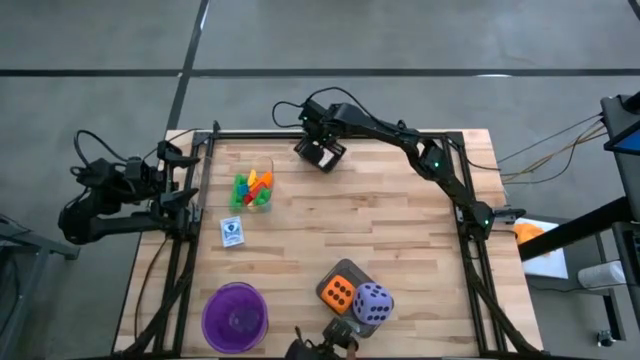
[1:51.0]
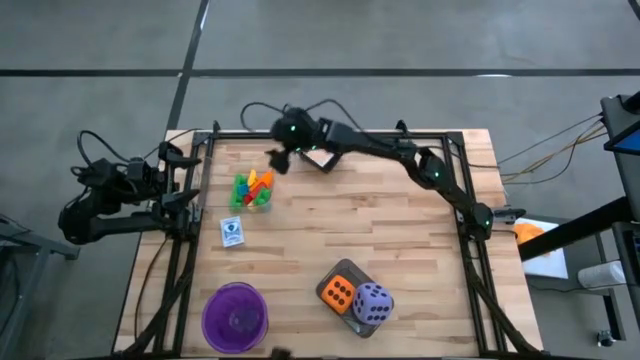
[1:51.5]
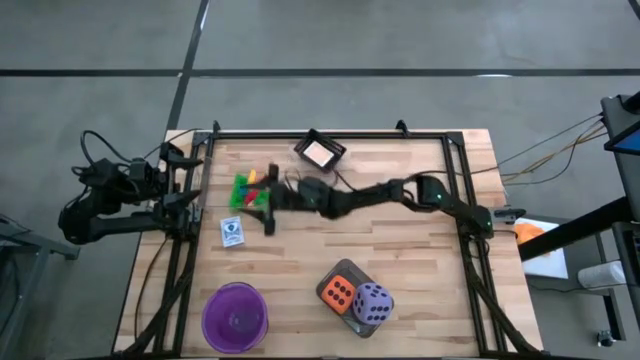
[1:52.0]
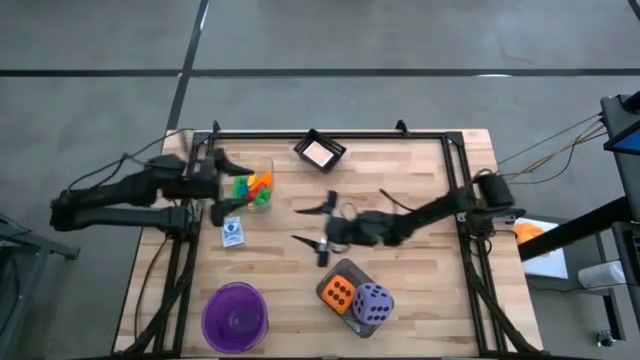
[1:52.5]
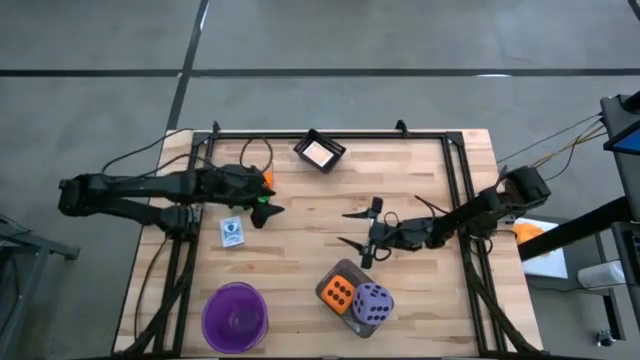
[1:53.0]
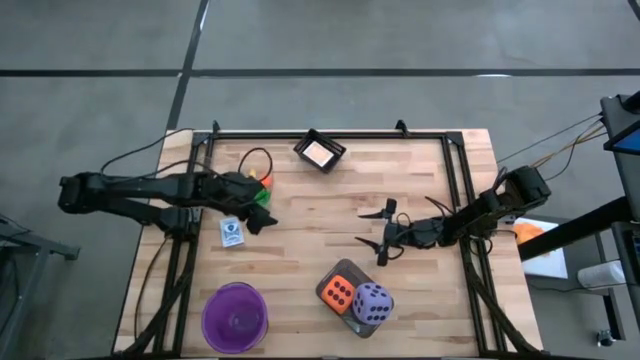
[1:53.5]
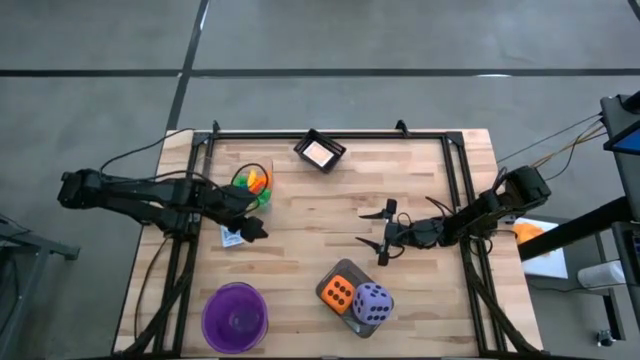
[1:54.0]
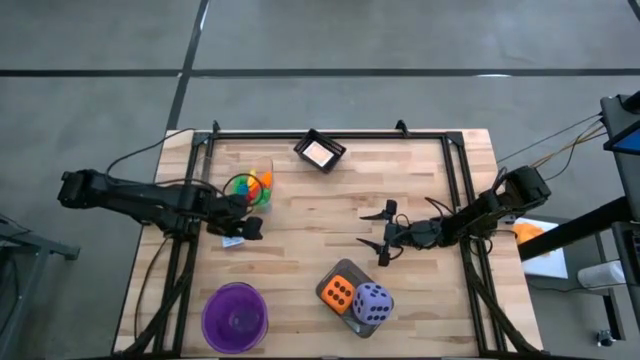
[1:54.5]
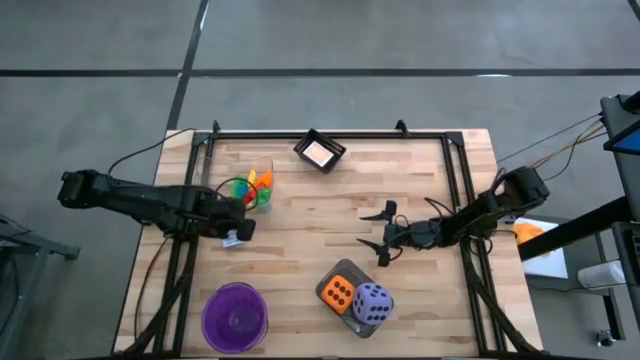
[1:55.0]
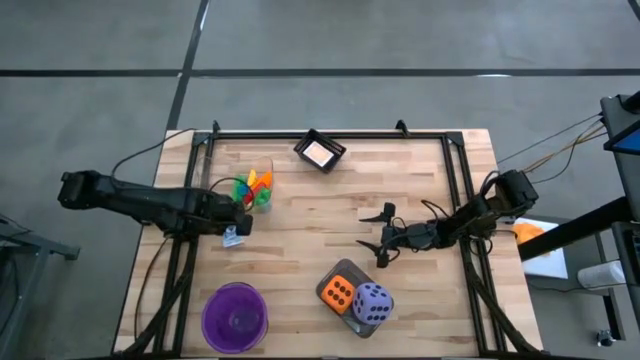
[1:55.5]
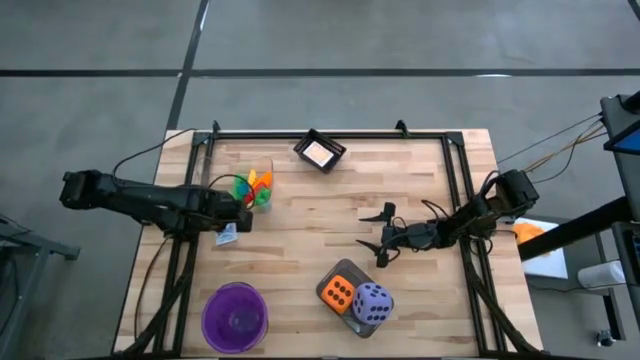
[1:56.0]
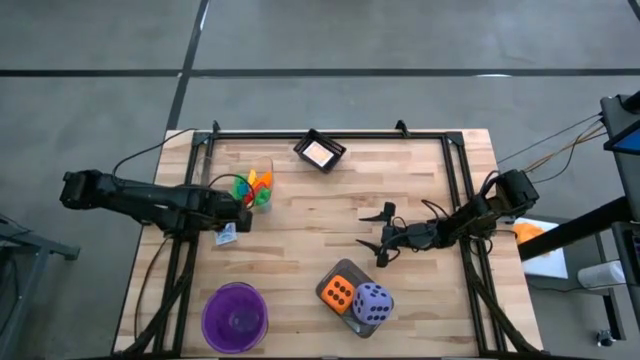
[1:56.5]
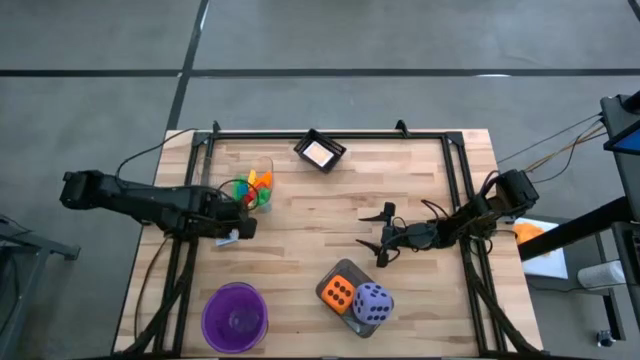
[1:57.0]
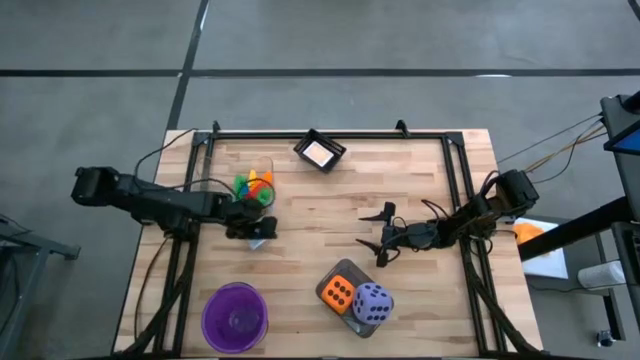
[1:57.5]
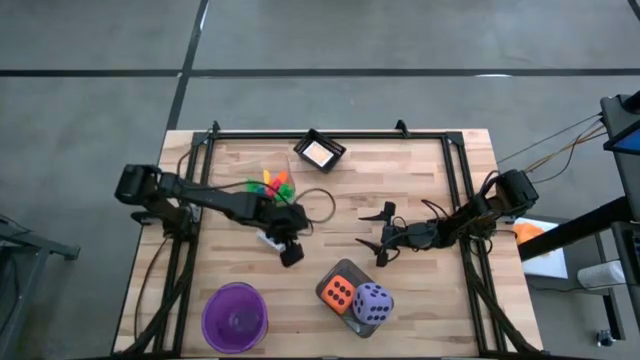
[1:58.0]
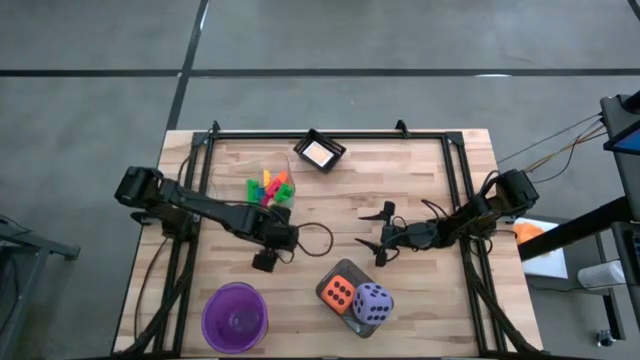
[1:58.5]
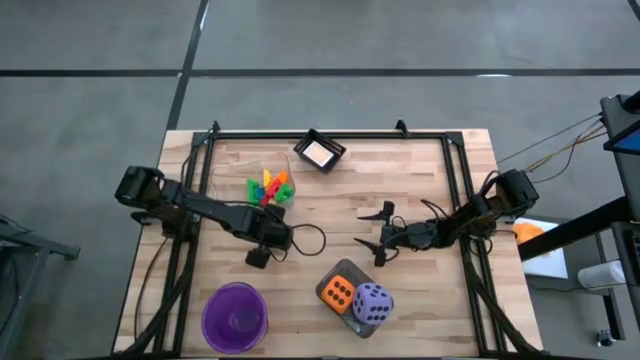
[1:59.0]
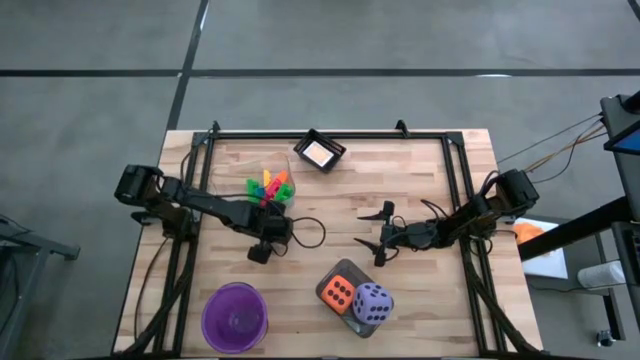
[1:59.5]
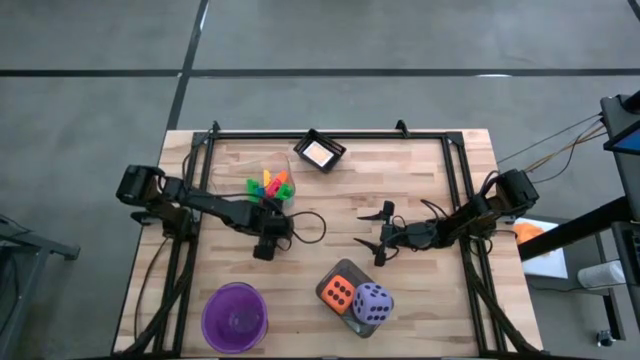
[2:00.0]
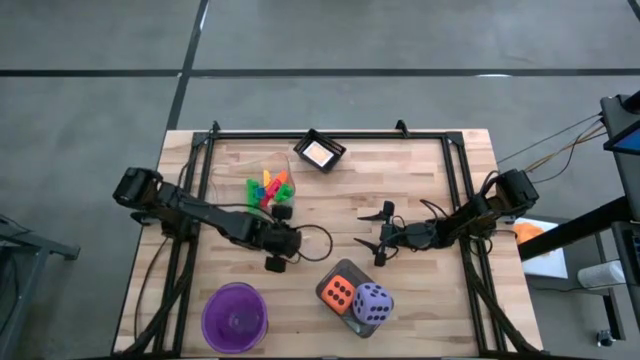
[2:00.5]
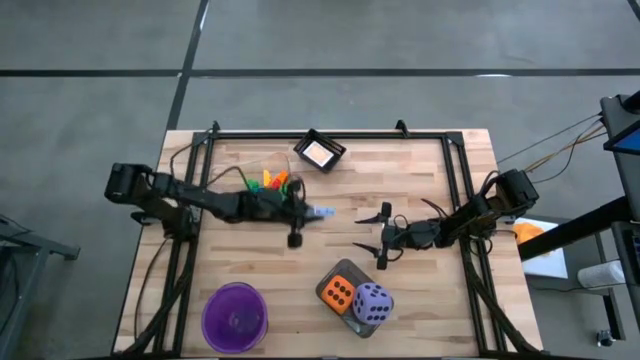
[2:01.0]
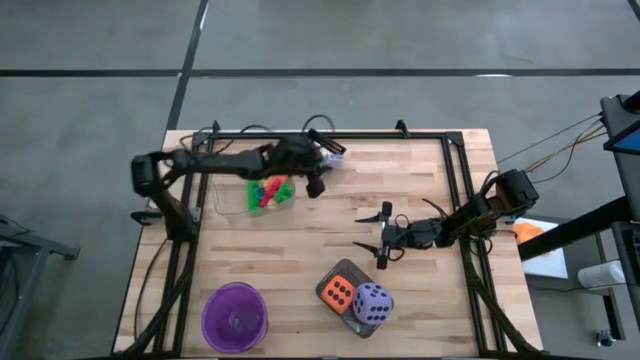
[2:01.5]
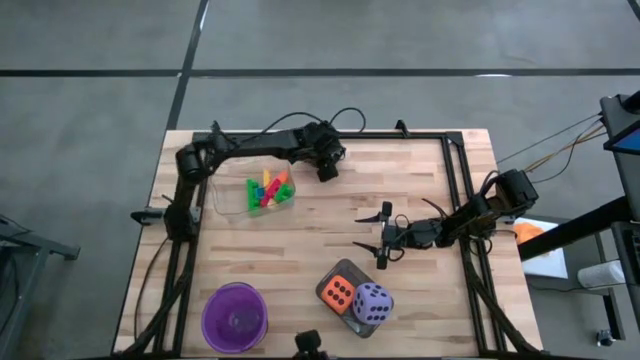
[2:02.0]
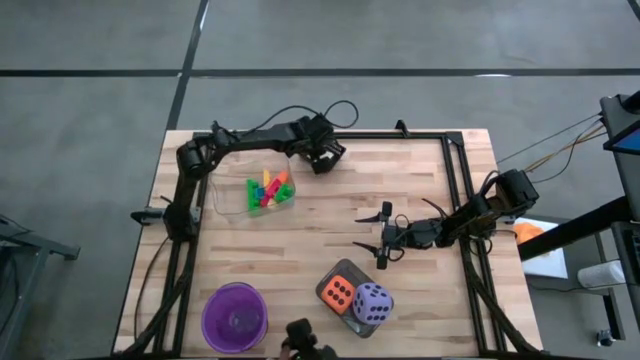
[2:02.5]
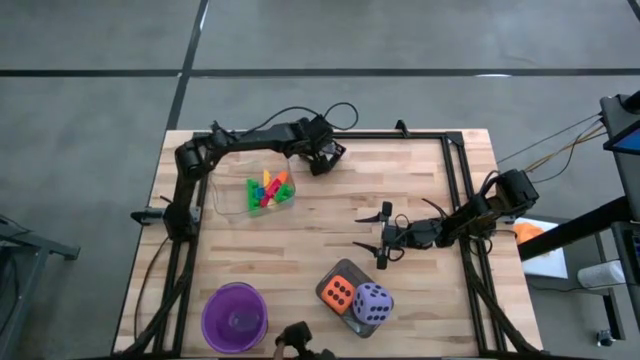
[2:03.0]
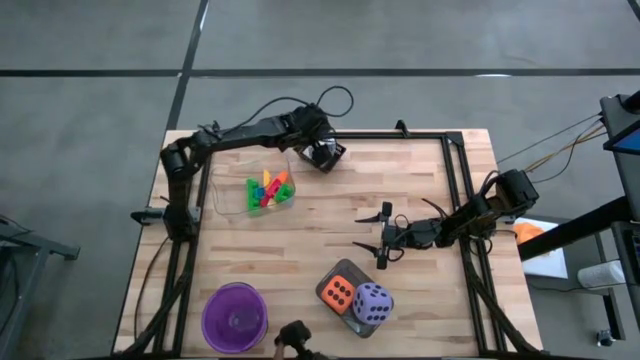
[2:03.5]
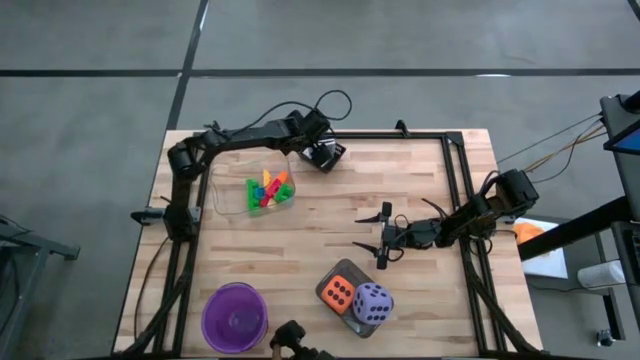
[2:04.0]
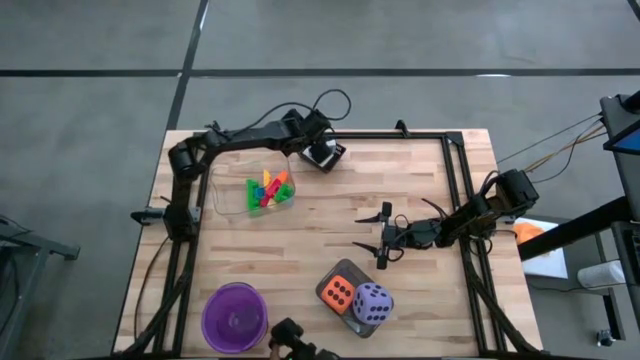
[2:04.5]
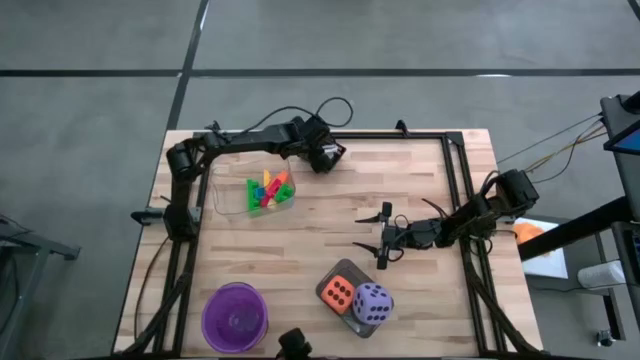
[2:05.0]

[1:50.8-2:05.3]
Task: Pick & Place Toys
Put the blue playing card box into the black bin

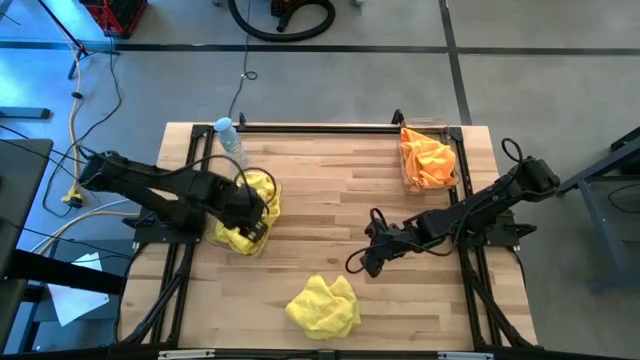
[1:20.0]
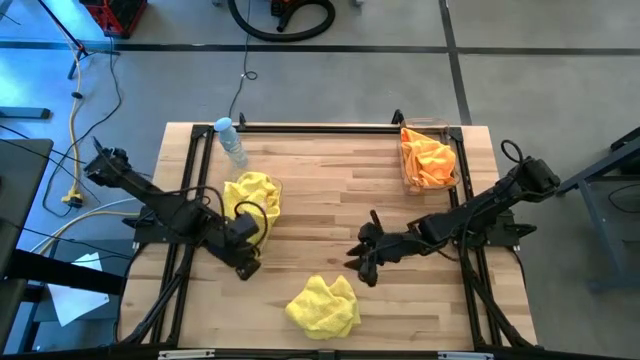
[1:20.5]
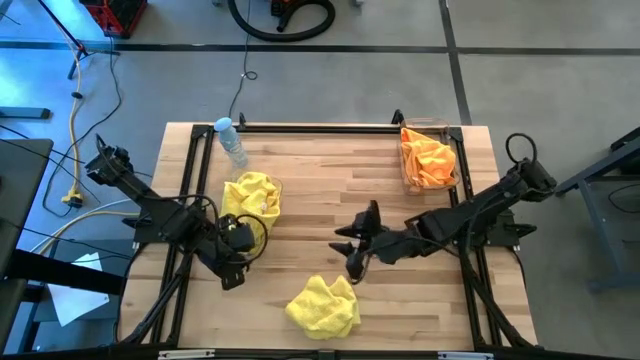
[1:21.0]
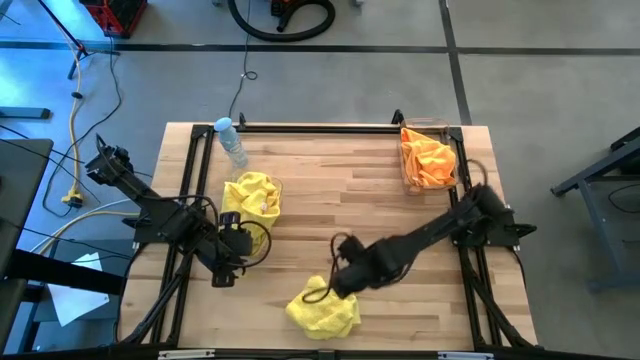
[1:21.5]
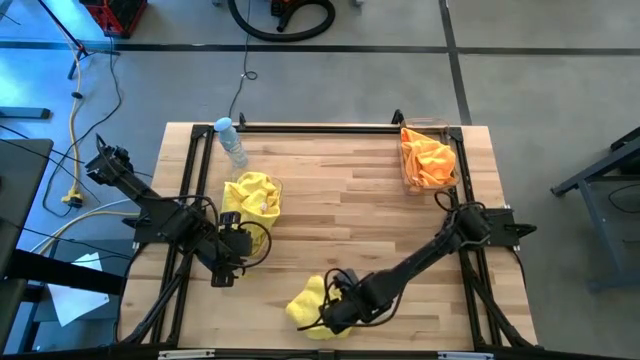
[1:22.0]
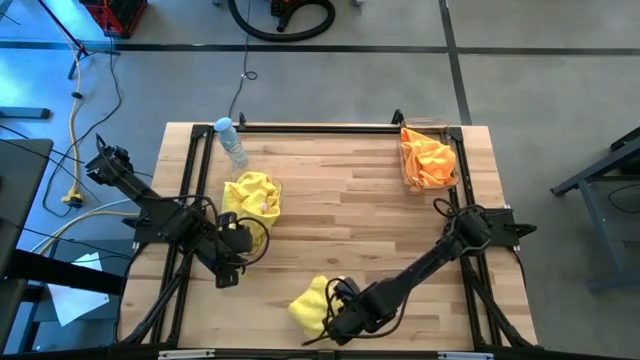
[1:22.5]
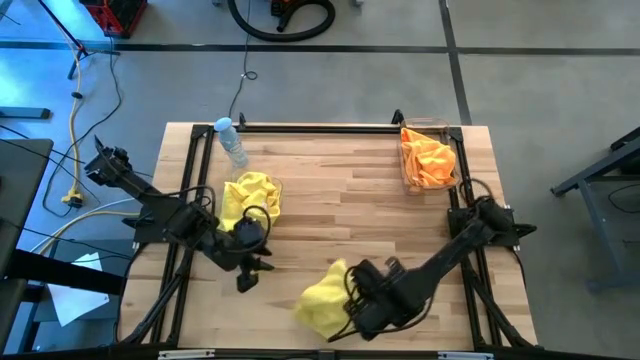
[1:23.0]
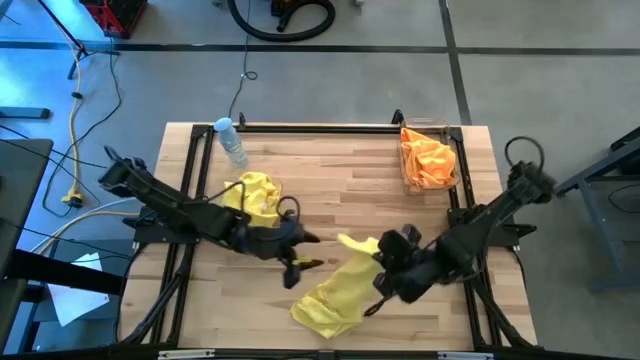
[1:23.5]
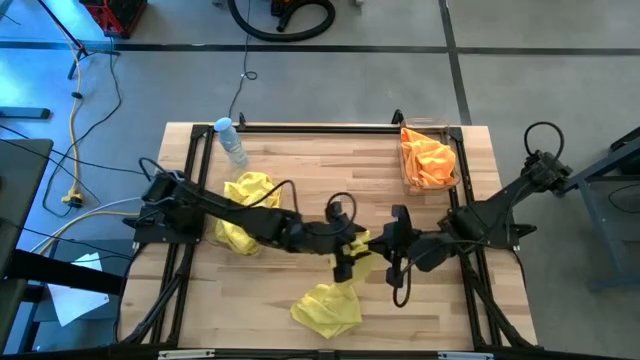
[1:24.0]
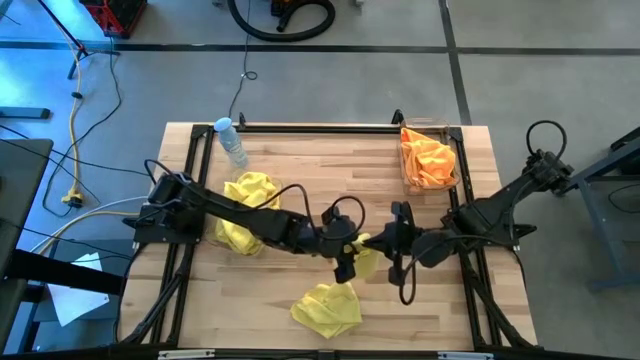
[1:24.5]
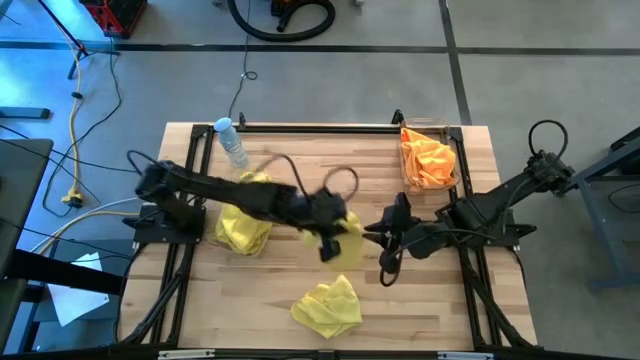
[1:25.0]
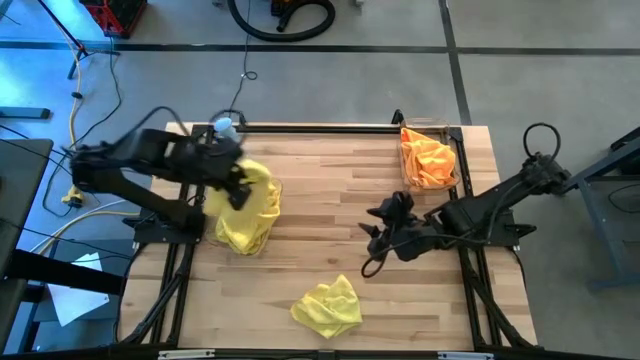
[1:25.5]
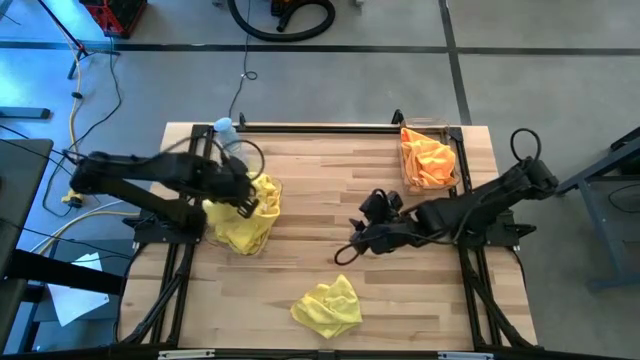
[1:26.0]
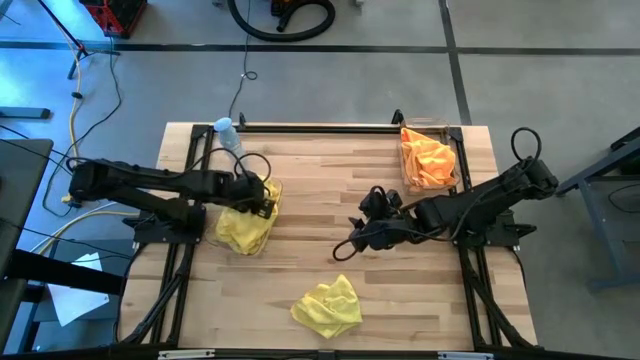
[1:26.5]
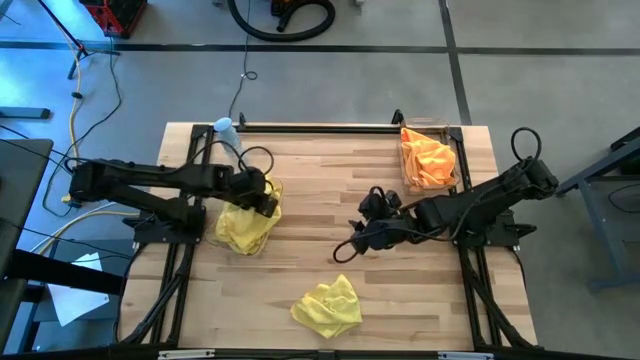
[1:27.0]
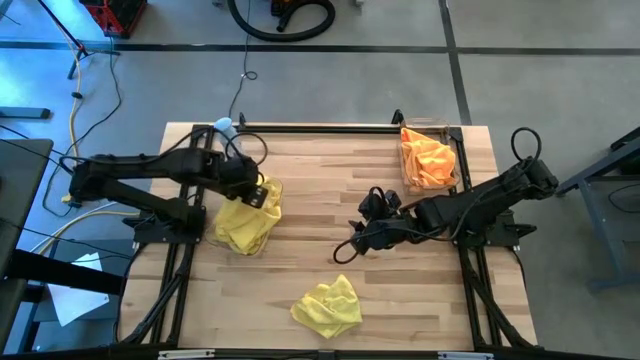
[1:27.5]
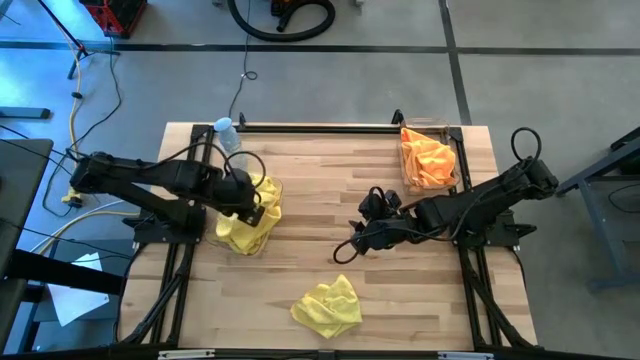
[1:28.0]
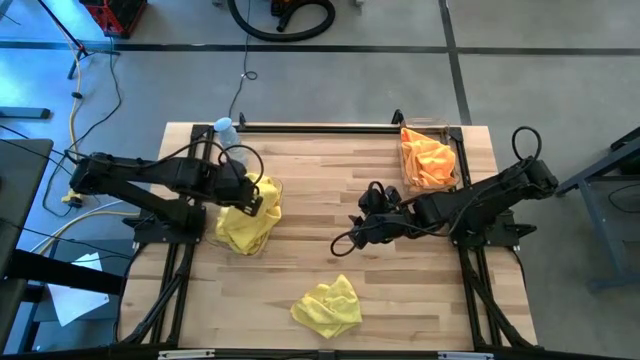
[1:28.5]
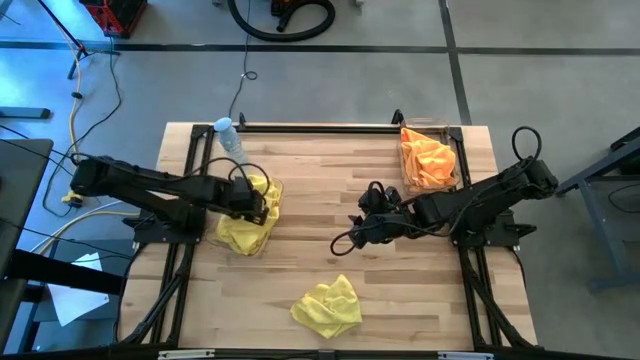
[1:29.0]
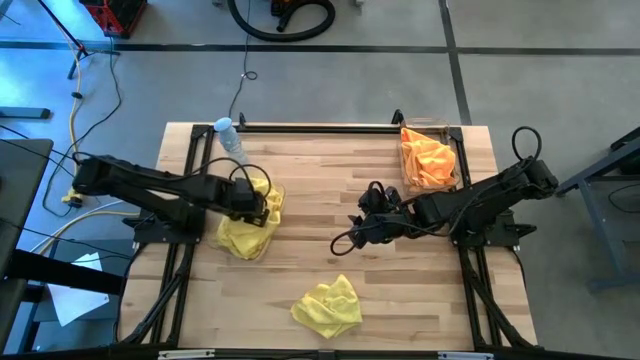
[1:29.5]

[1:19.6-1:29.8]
Task: Sort microfiber towel by color & place in baskets
Put the yellow microfiber cloth into the left transparent bin
